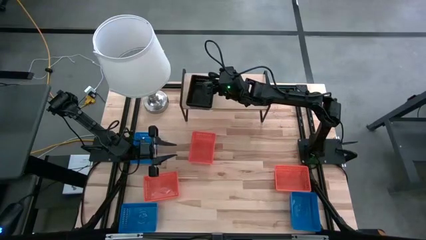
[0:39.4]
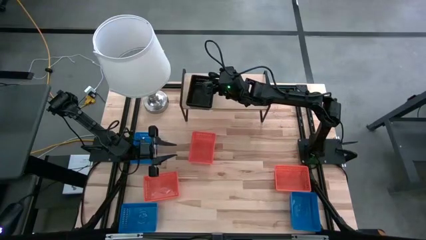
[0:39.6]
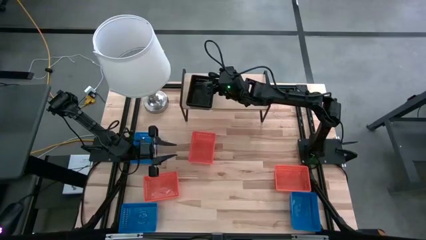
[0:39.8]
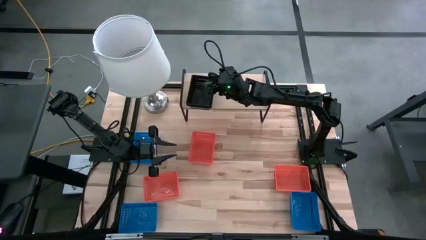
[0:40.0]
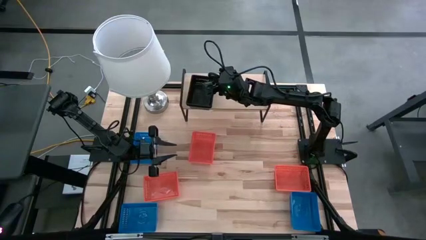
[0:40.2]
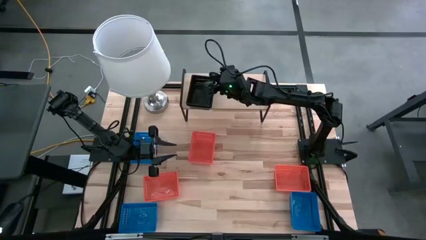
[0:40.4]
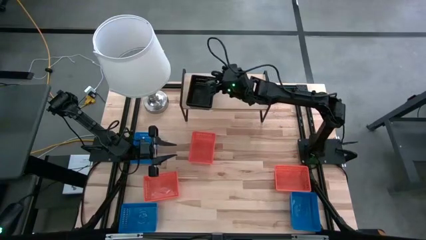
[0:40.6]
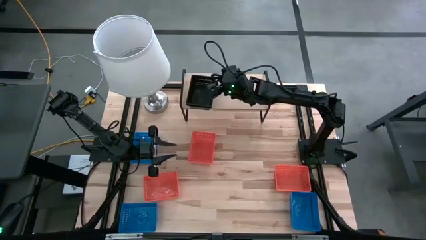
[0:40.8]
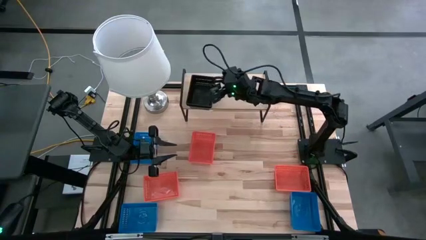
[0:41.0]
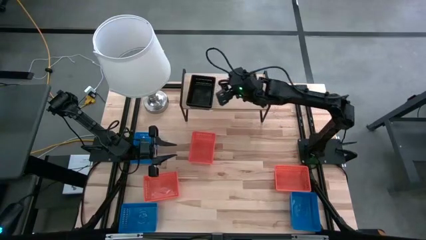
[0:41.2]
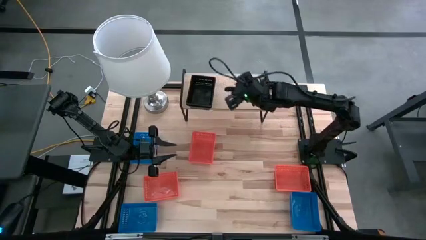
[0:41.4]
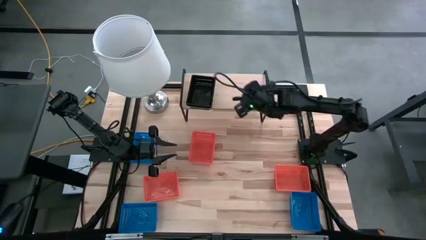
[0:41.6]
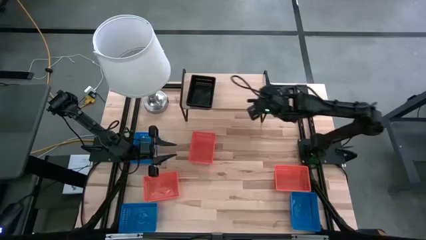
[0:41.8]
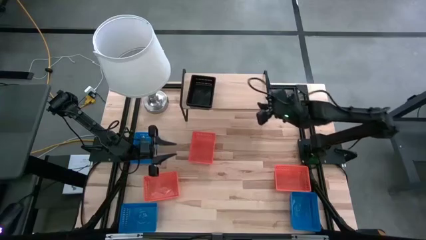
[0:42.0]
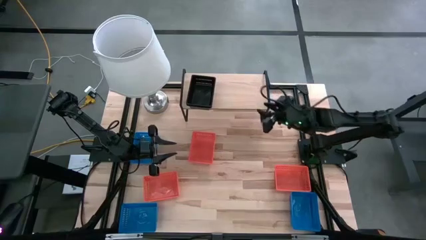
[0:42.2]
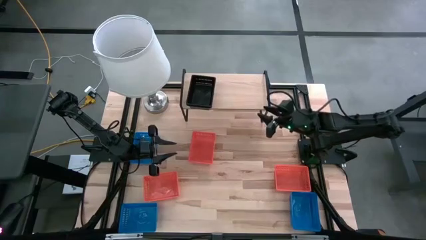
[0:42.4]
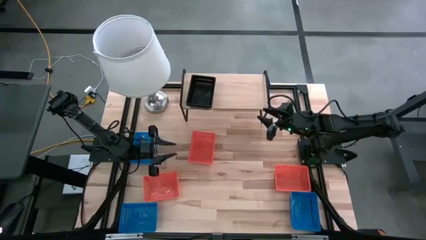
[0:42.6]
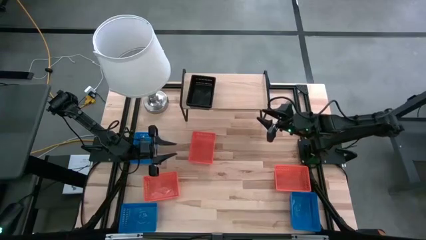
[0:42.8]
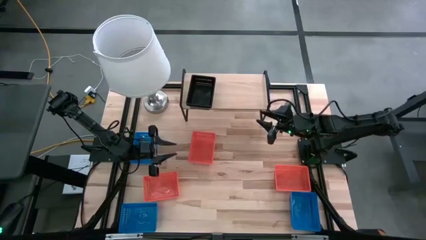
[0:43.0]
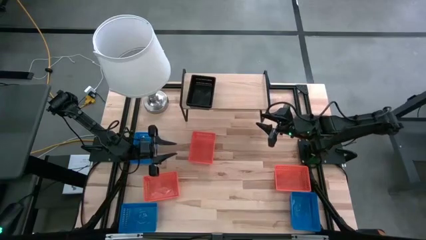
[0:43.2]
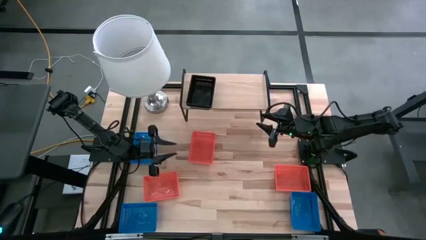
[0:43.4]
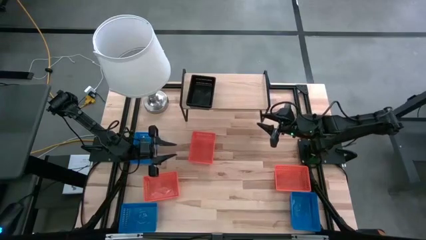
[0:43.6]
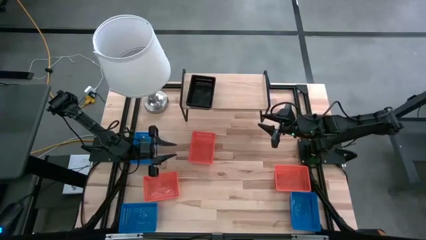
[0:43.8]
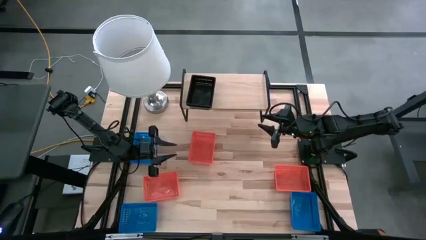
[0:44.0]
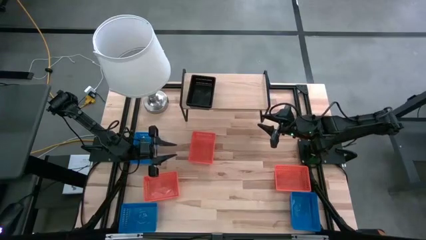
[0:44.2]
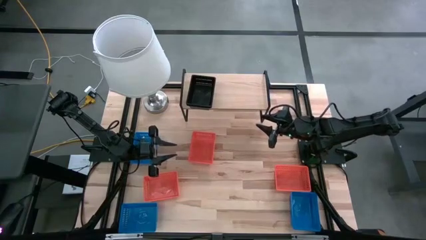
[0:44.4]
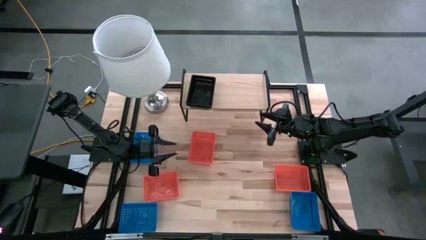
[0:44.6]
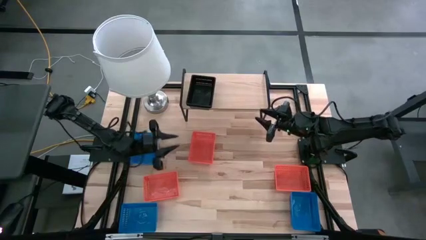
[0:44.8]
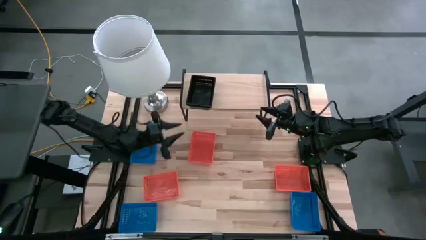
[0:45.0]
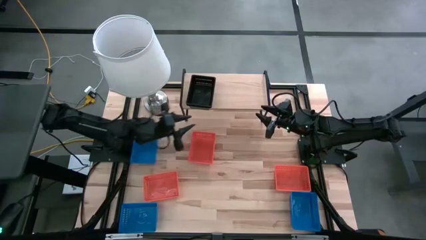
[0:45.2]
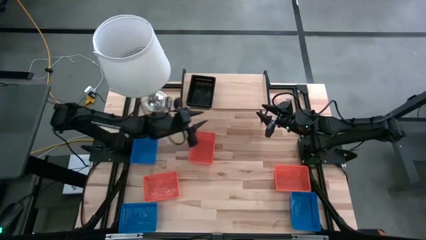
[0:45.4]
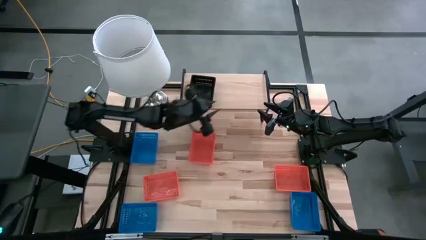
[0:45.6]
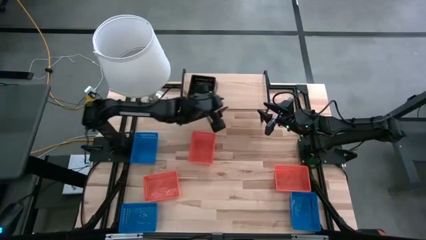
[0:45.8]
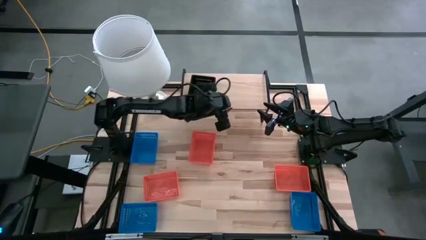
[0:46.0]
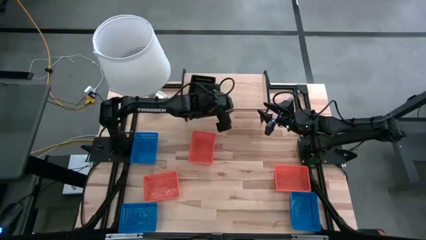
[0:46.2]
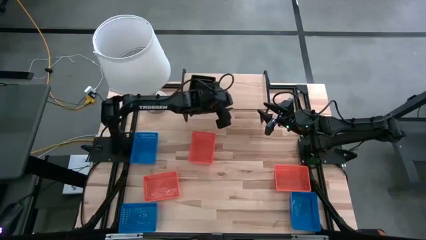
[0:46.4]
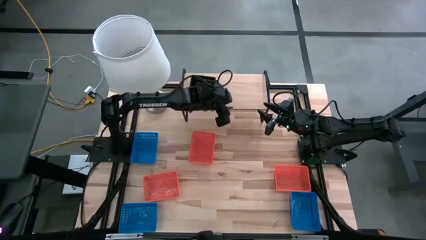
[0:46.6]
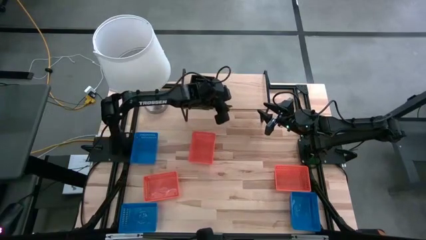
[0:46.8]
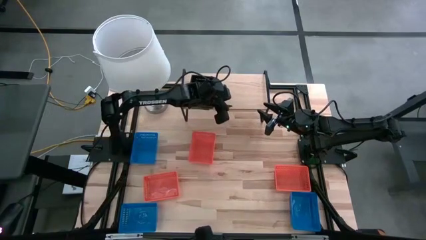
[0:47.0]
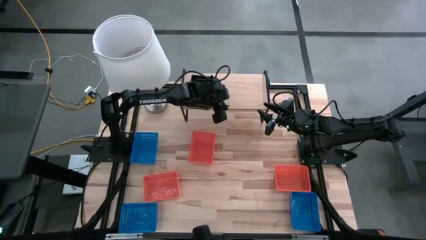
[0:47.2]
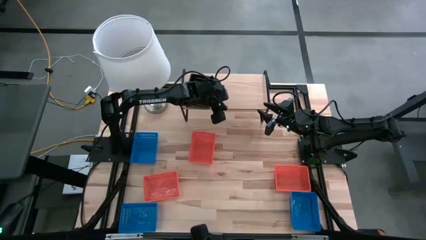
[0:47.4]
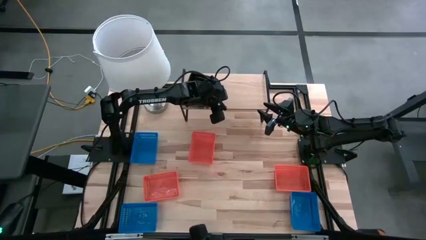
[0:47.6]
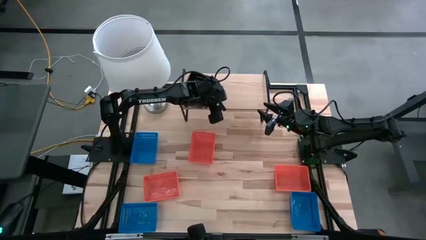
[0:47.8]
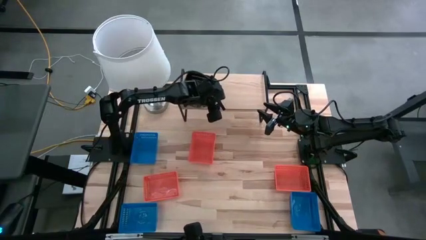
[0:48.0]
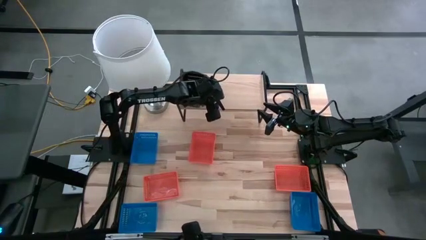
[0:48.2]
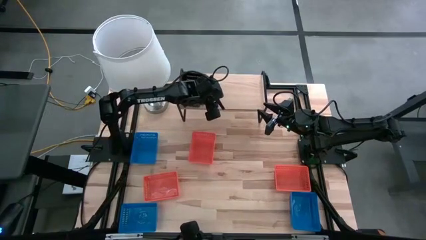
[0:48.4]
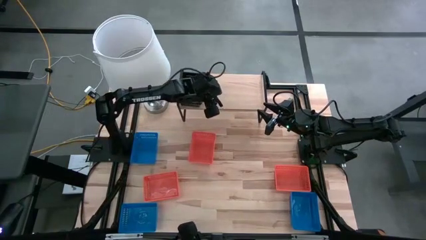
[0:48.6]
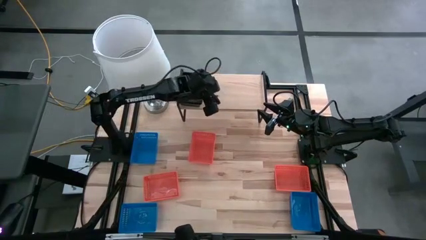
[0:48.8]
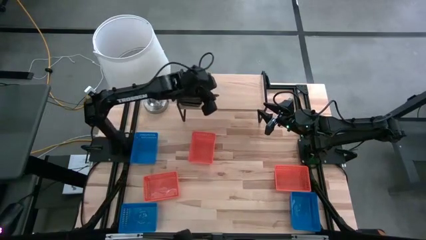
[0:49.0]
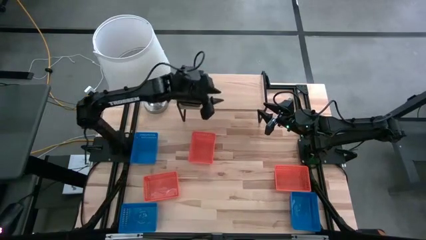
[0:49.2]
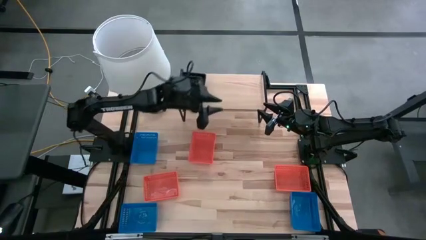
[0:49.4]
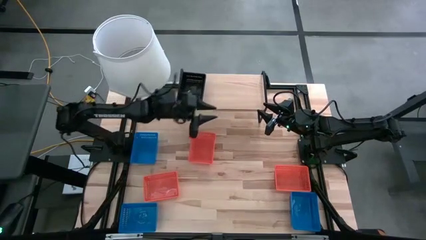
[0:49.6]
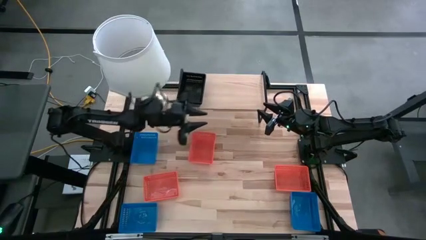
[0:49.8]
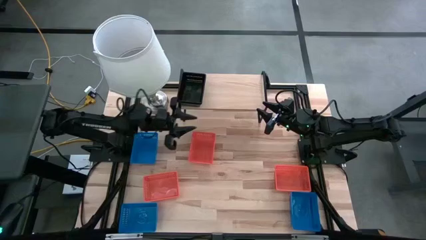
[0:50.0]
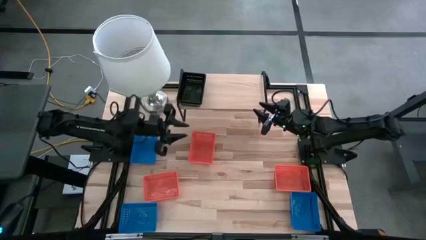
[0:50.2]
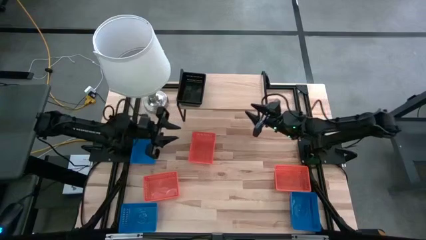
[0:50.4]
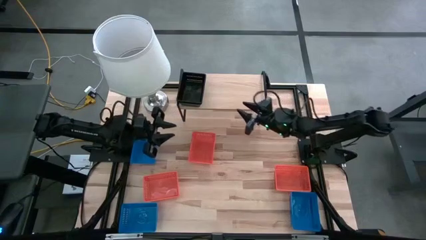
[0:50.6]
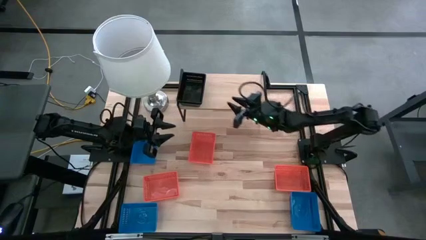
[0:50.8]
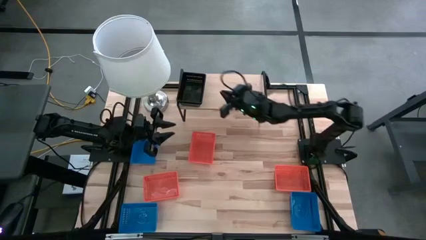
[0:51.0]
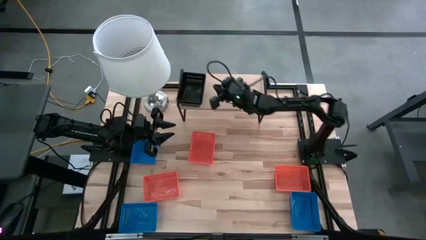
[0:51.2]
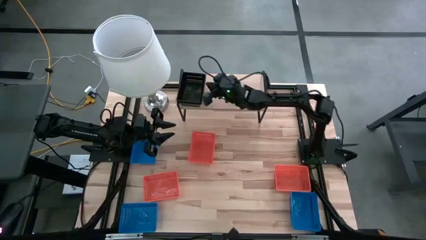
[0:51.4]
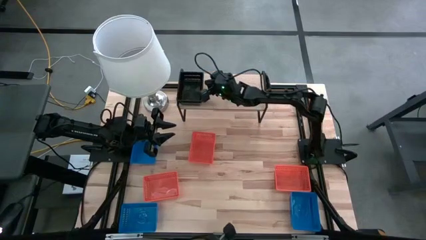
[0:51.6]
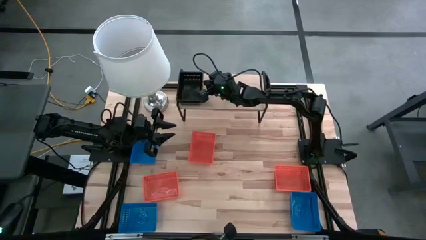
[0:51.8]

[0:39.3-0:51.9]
Task: Stack baskets on shelf by color
Adjust the stacked black bins on the shelf

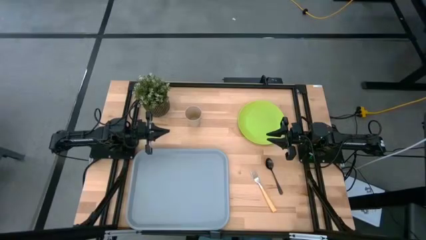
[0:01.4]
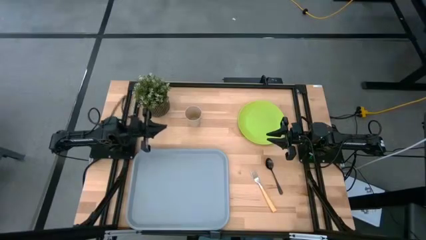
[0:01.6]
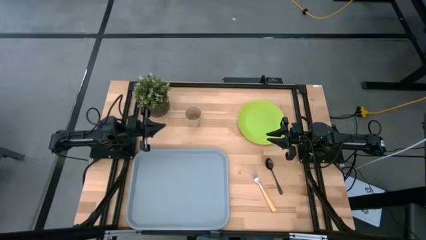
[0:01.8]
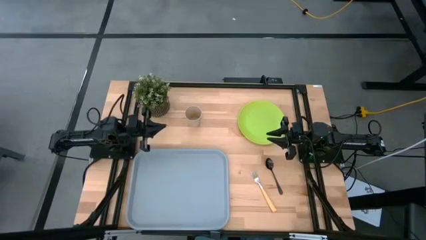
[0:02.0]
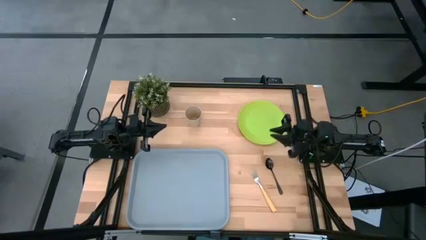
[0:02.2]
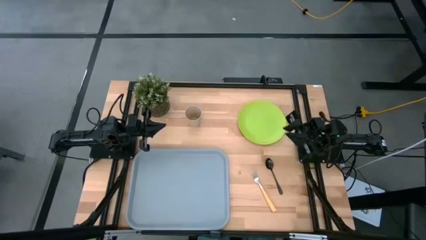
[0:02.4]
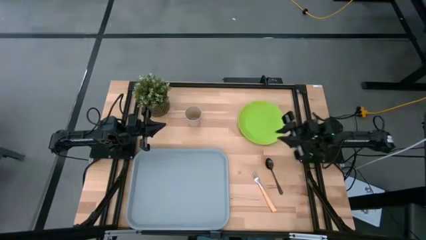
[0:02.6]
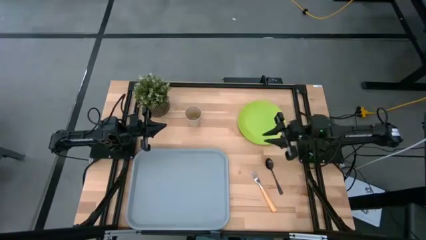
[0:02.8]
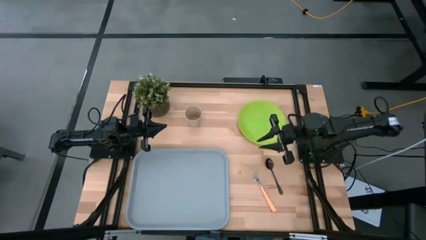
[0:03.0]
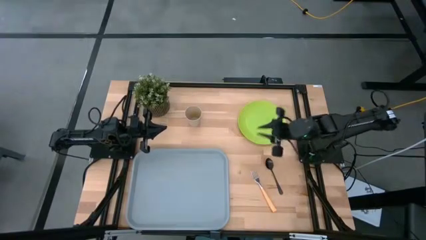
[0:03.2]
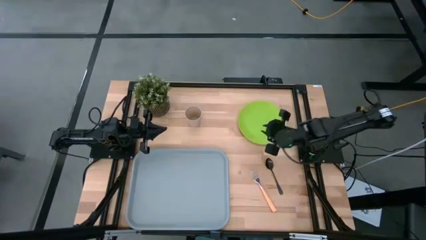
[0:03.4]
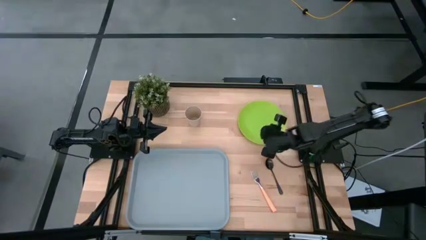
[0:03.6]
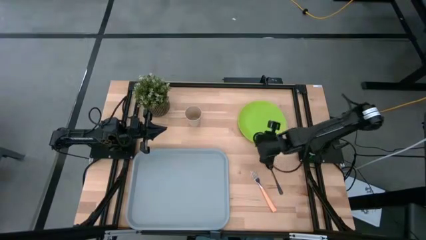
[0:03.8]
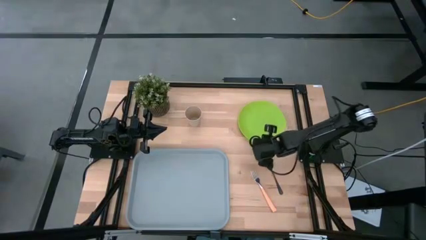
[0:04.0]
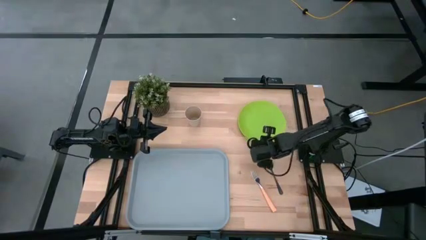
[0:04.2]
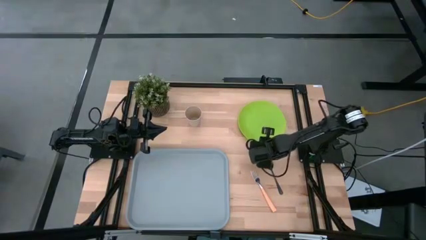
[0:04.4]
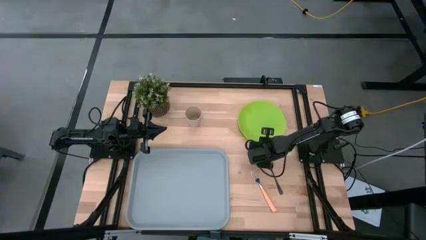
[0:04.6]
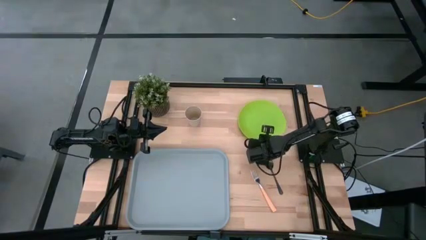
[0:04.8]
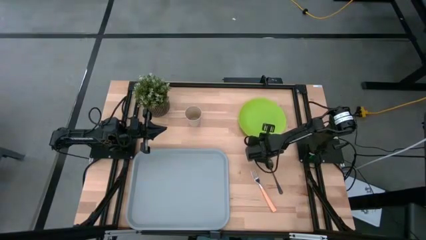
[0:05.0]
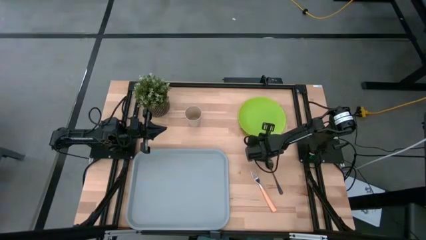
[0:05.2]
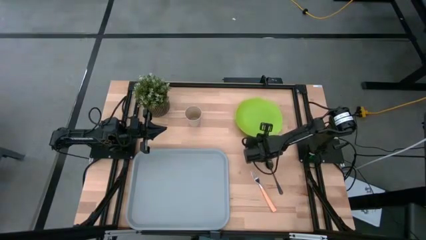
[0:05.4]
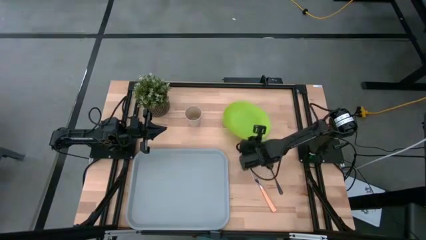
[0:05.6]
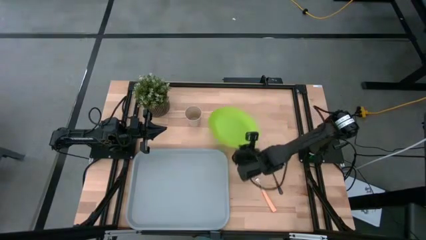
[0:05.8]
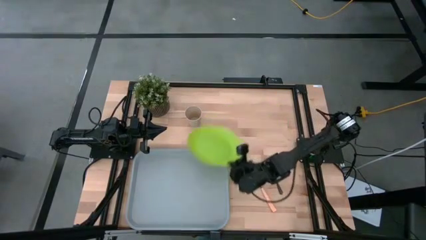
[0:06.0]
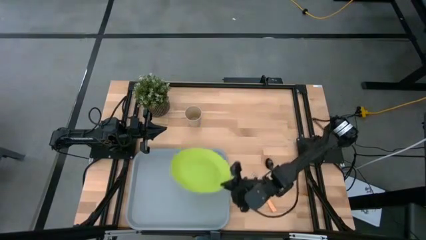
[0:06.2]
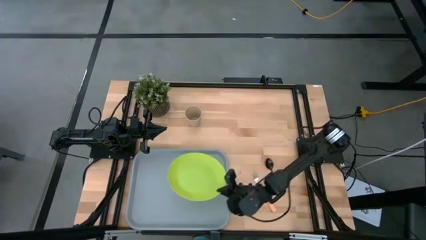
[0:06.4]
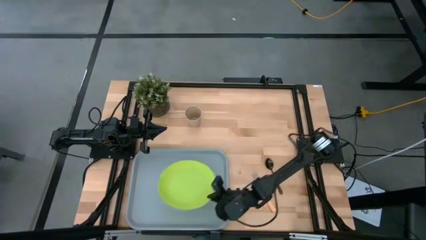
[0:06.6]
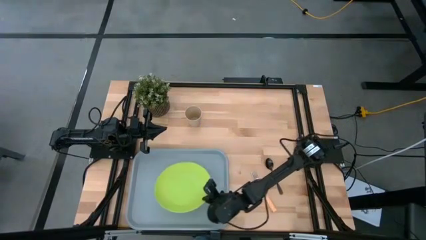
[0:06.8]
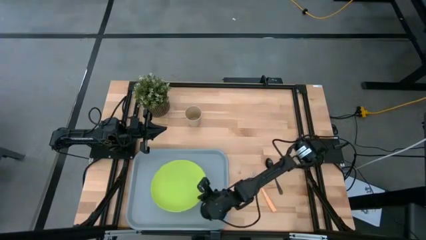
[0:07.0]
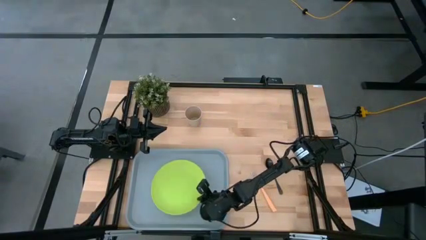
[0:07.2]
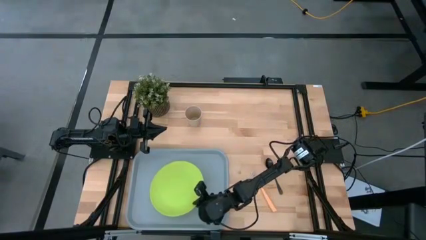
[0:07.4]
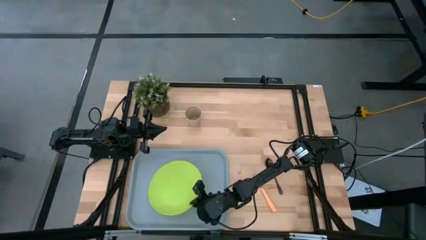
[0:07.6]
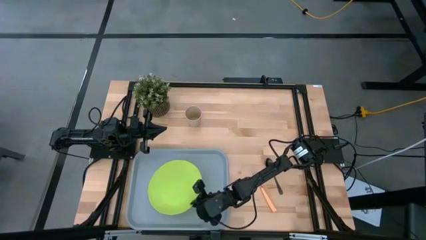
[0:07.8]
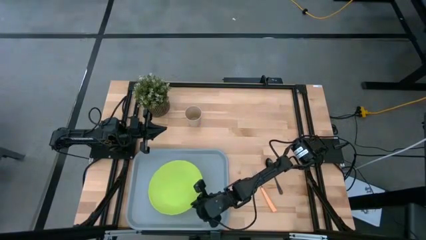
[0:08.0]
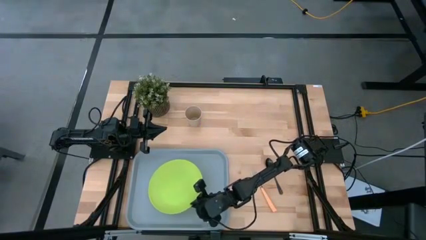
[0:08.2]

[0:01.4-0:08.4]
Task: Pick and place plate/cup/fork/spoon on tray
Put the light green plate on the serving tray
